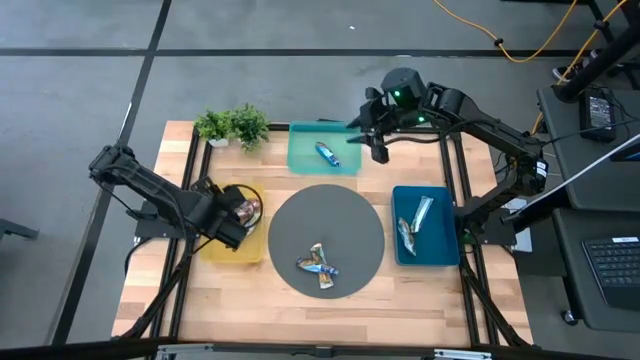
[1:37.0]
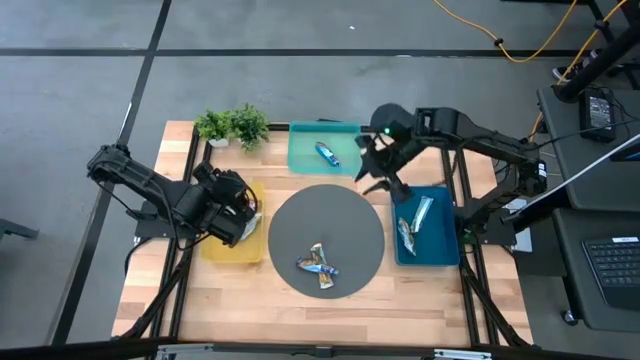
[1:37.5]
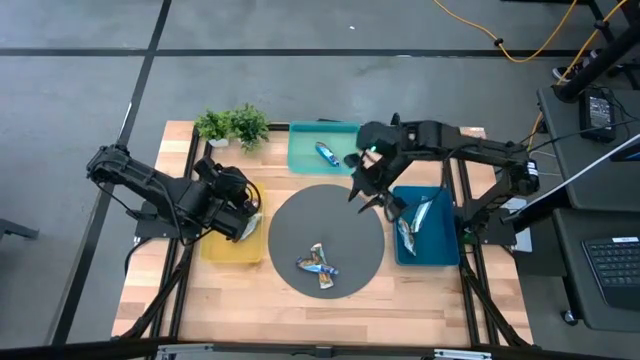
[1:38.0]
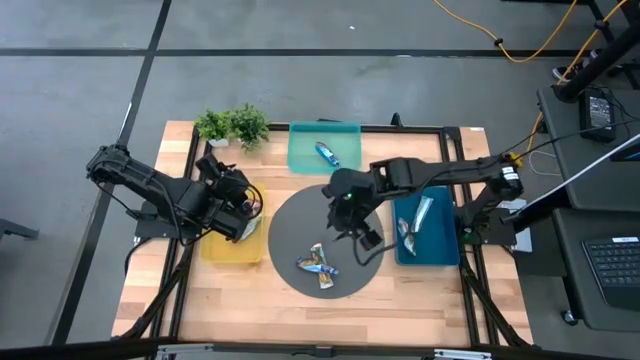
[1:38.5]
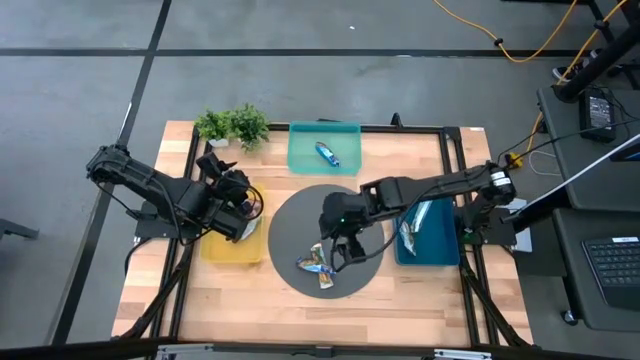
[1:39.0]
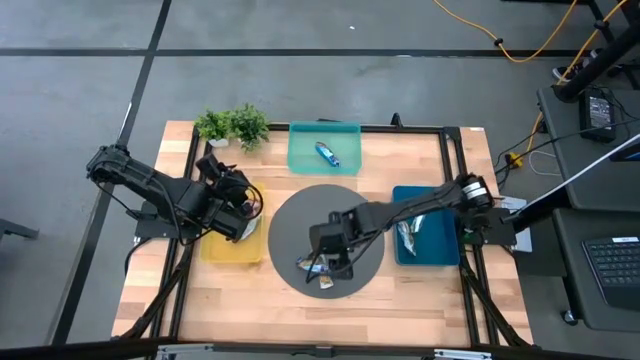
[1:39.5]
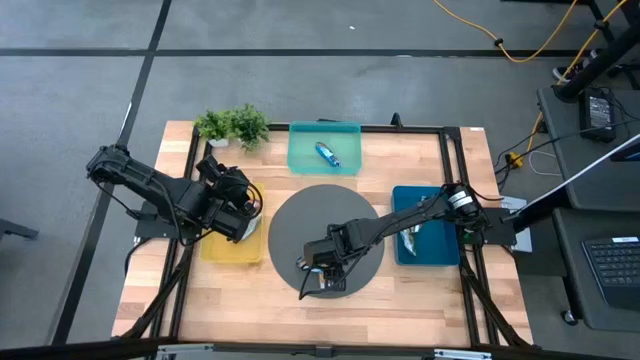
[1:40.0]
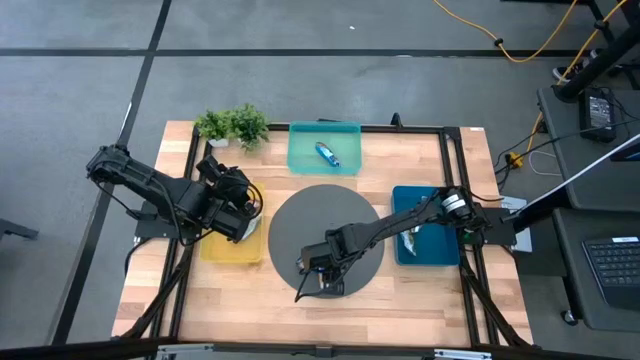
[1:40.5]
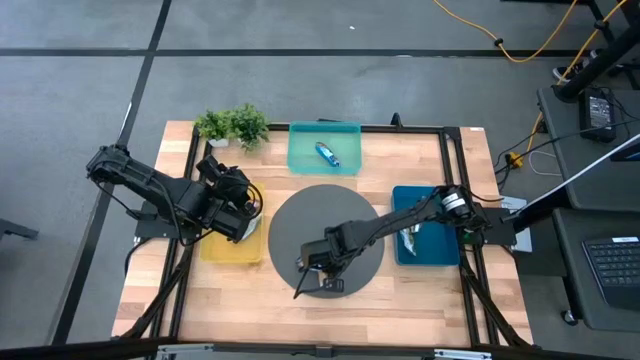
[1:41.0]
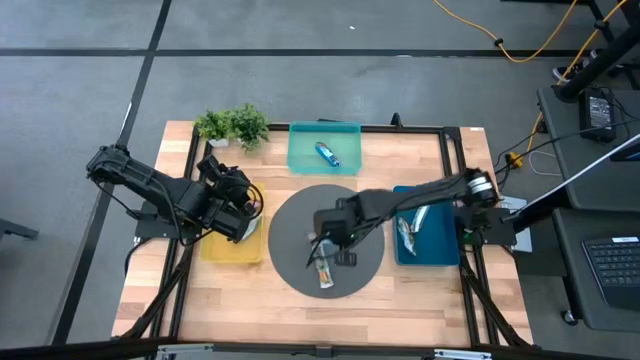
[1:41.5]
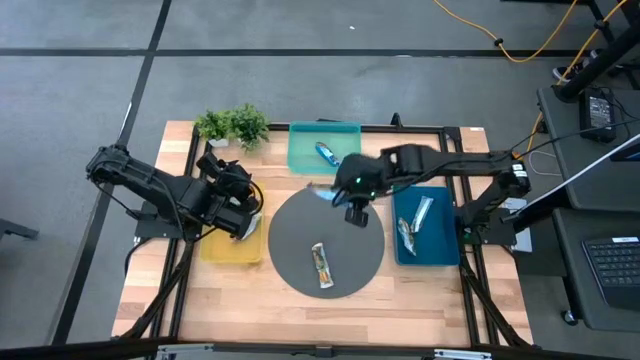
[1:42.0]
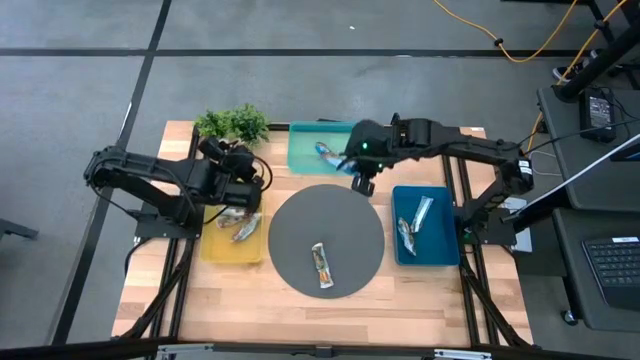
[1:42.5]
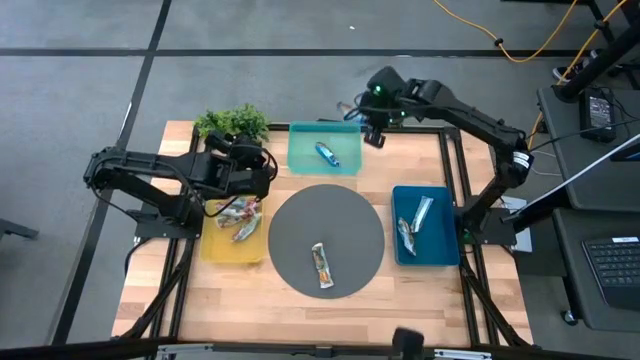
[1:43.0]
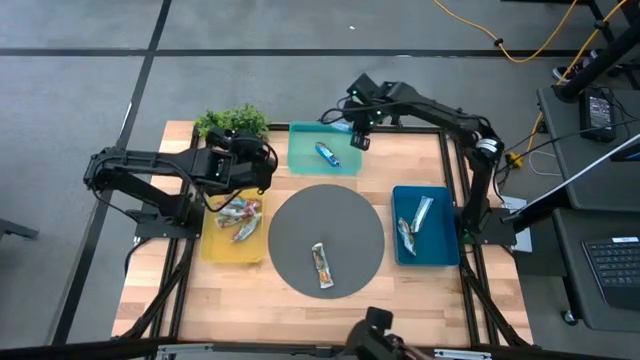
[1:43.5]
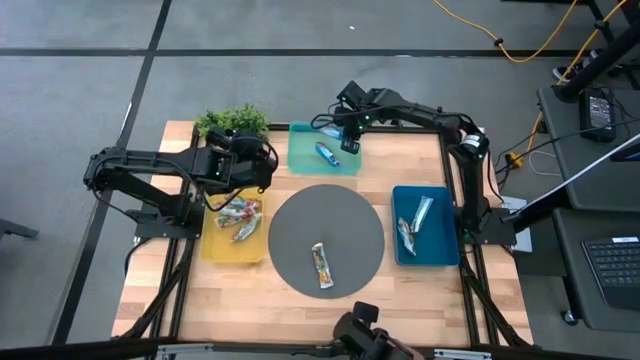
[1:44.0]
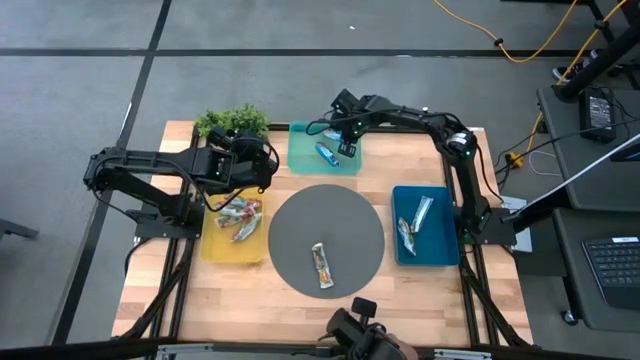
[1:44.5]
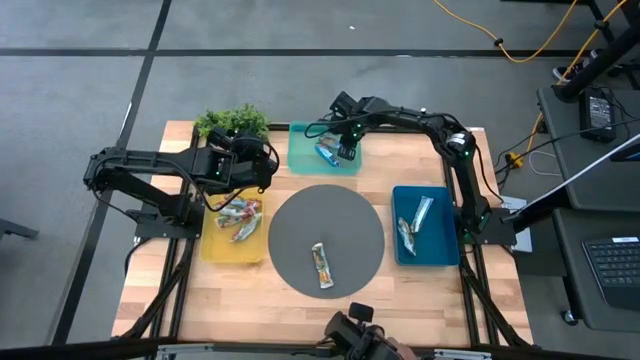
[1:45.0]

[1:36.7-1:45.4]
Task: Pick and place Granola Bars by type
Put the blue granola bar into the green bin

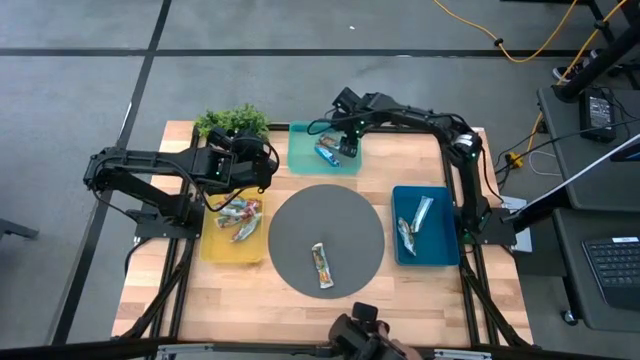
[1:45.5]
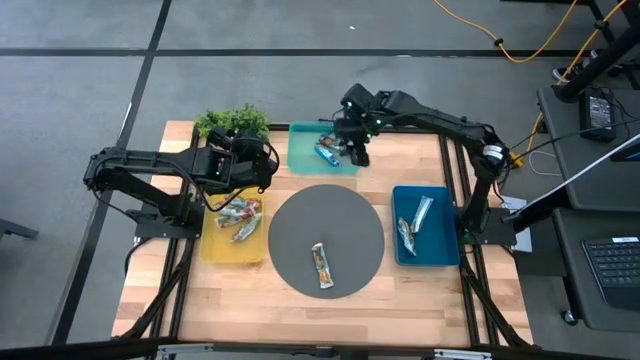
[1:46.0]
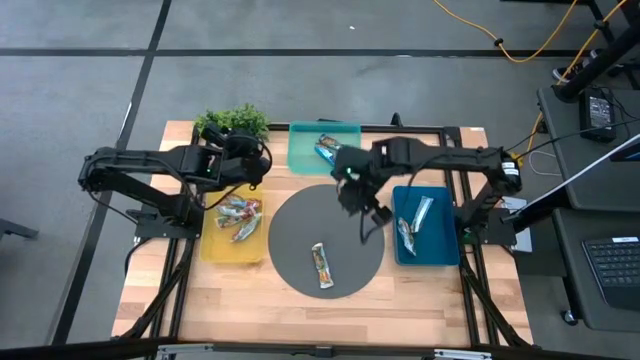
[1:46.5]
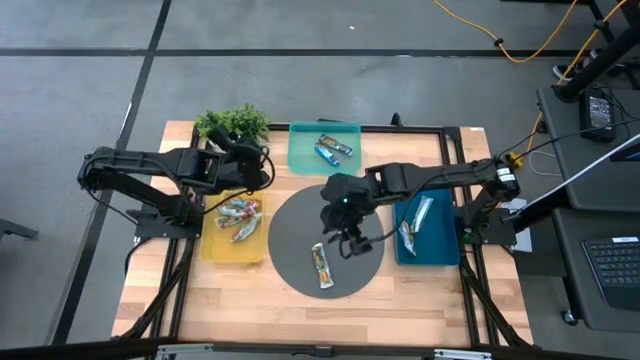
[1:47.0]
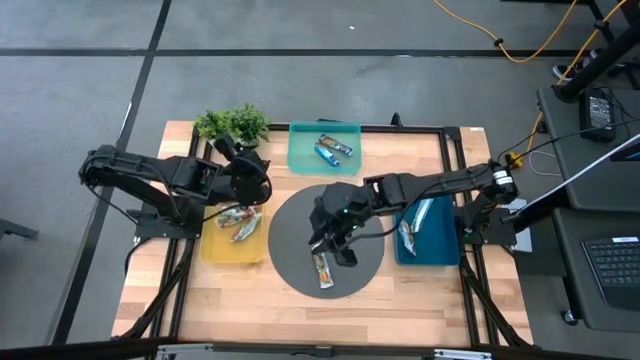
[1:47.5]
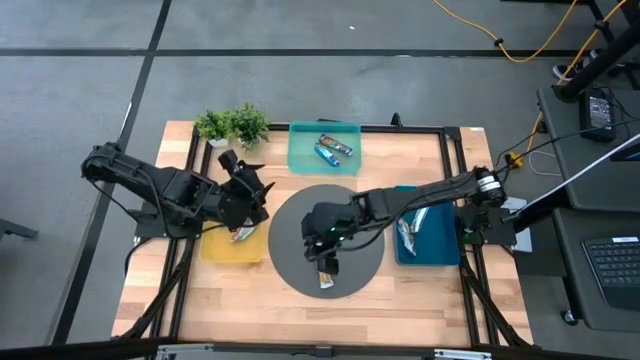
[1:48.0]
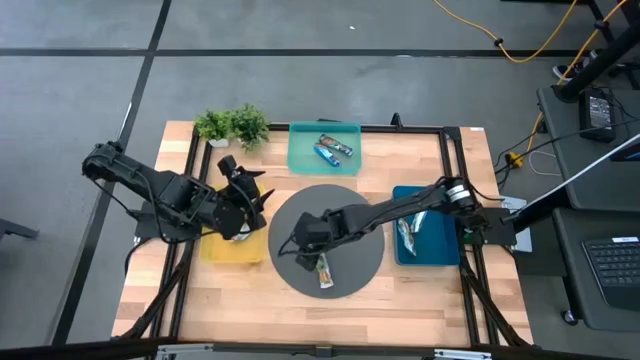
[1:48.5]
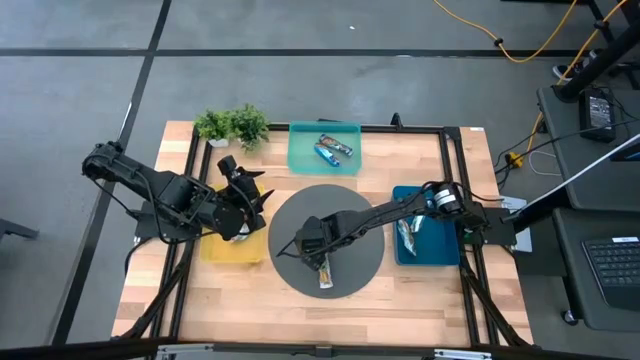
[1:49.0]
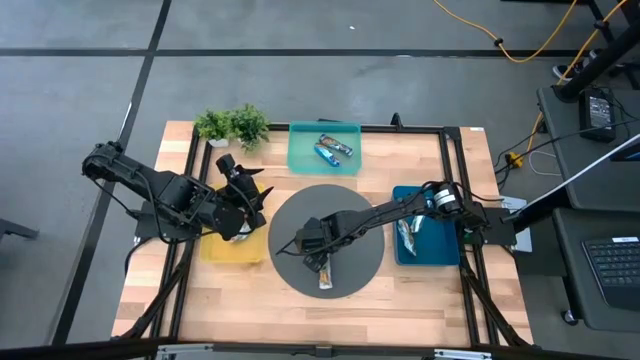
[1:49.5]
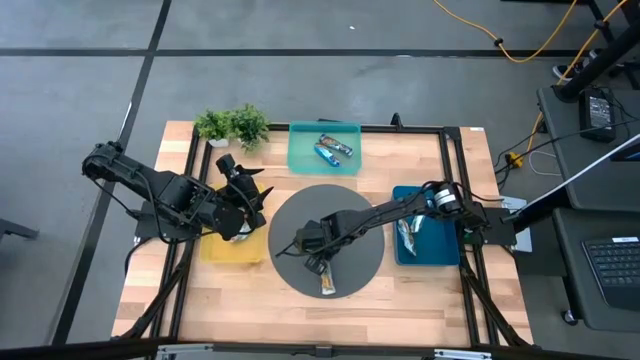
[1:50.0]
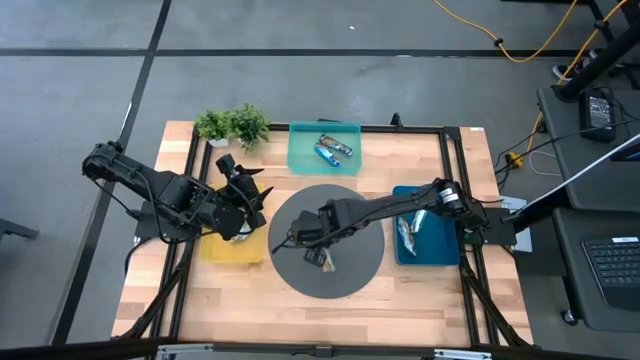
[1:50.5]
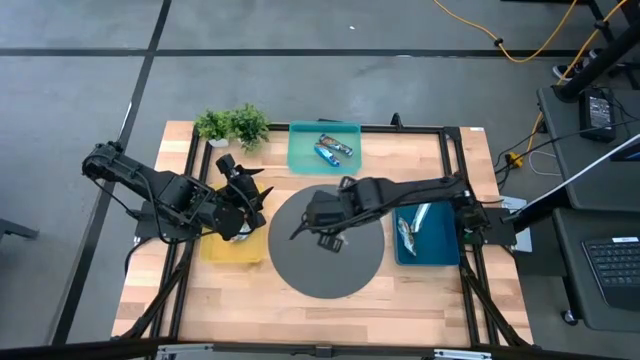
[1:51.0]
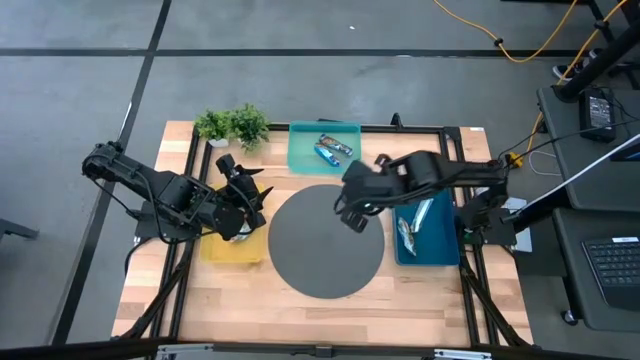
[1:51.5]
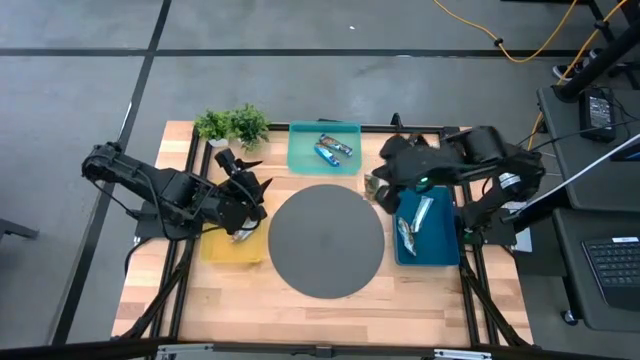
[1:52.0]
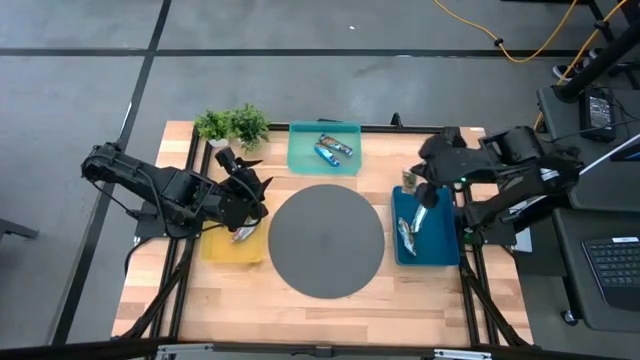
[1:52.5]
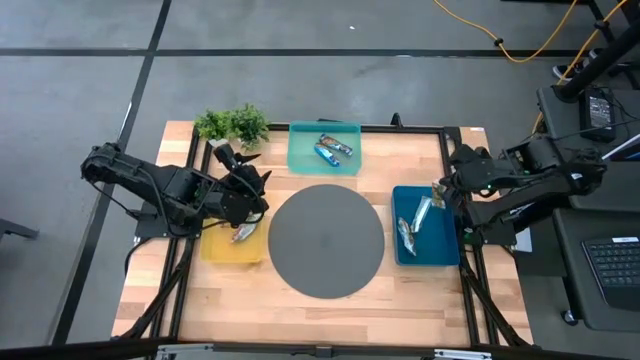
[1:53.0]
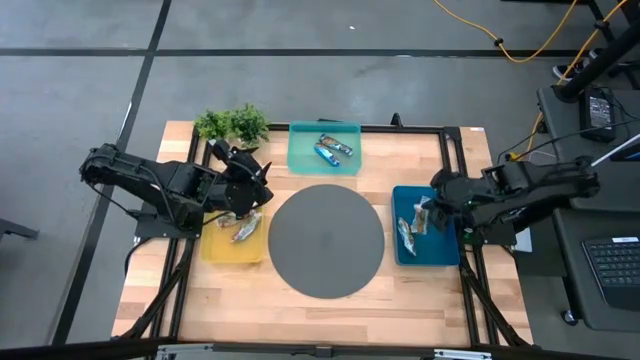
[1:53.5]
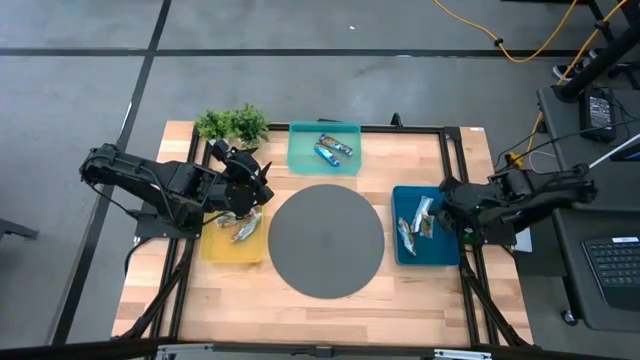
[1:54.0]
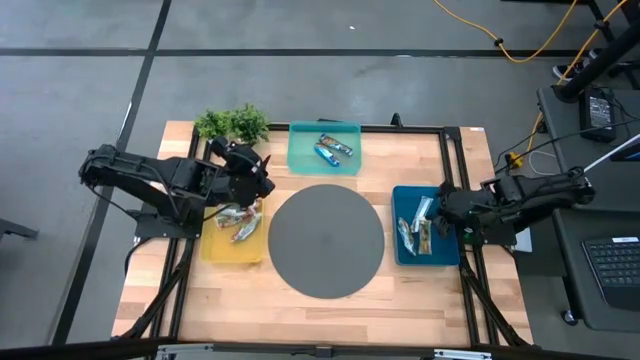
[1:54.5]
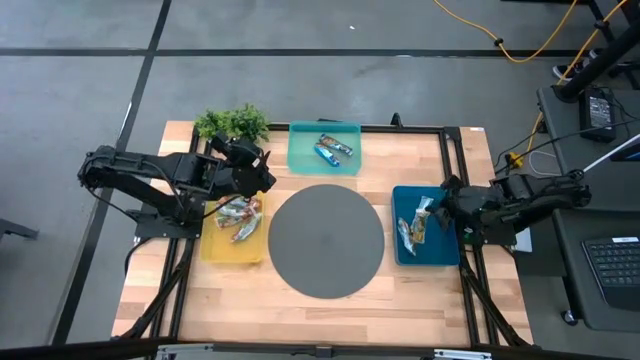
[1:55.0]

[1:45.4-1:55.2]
Put the yellow granola bar into the blue bin

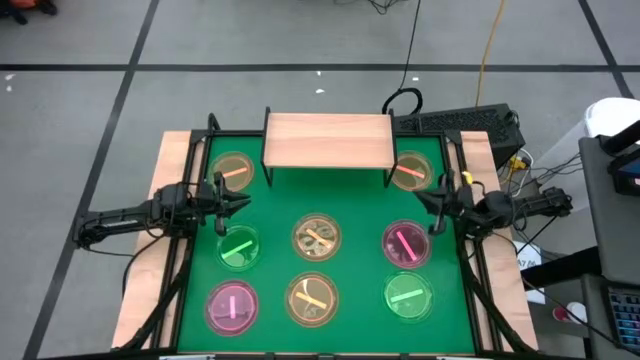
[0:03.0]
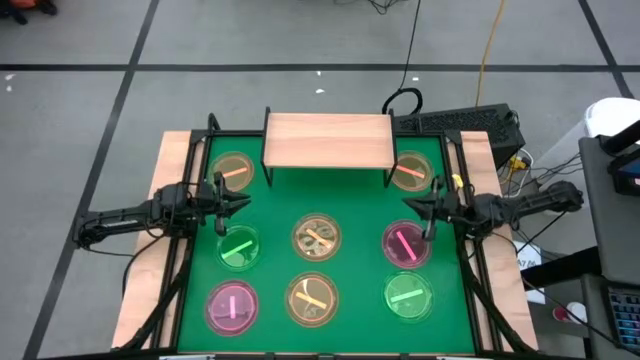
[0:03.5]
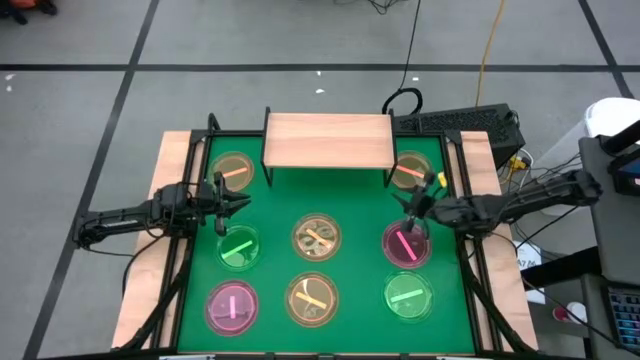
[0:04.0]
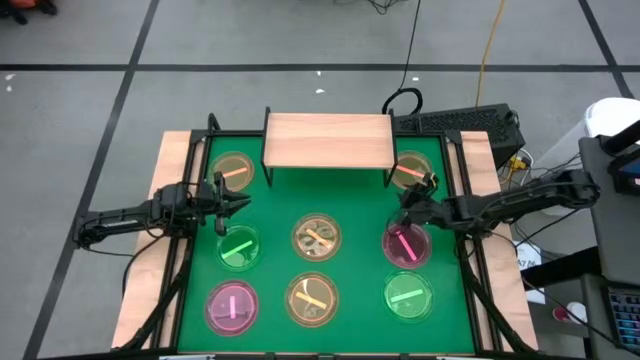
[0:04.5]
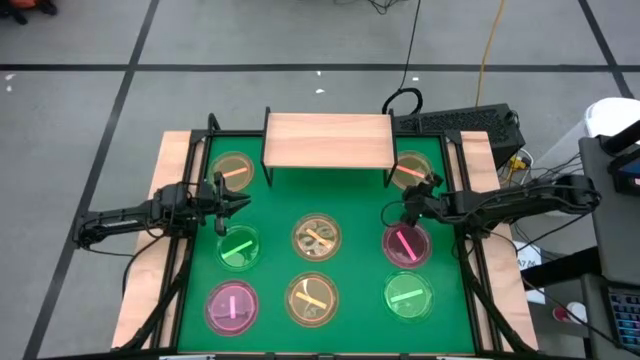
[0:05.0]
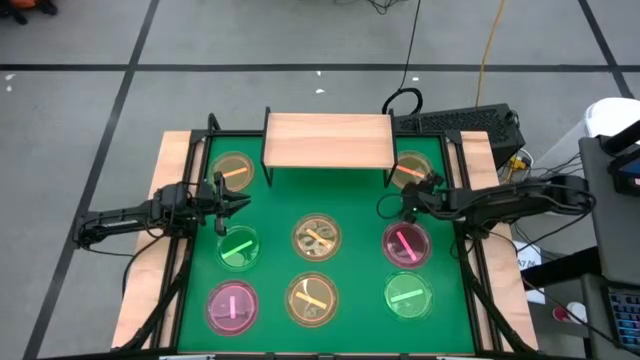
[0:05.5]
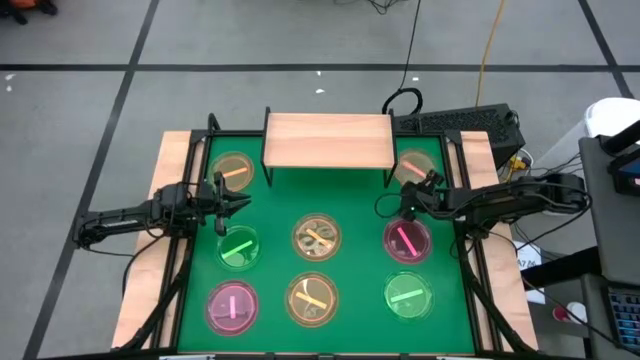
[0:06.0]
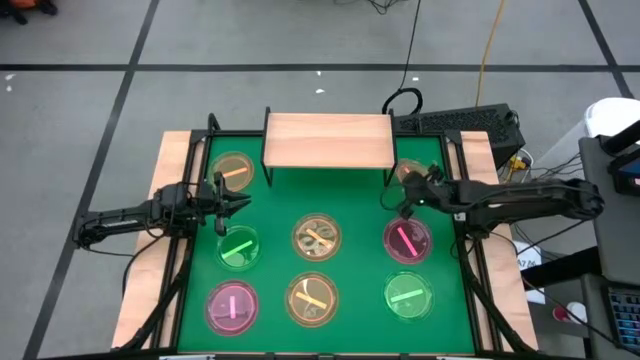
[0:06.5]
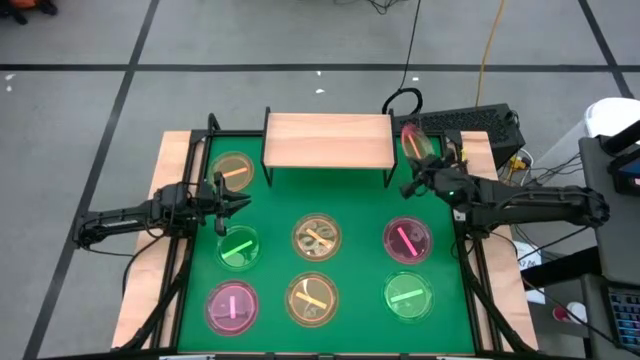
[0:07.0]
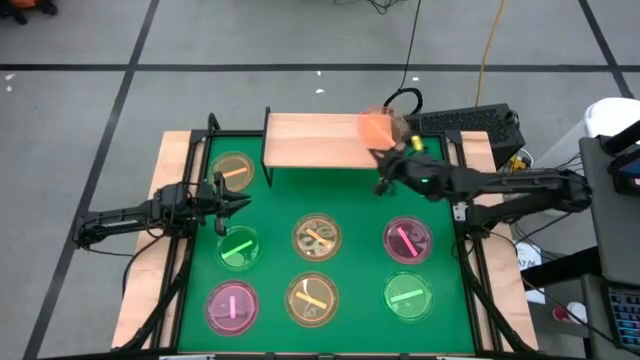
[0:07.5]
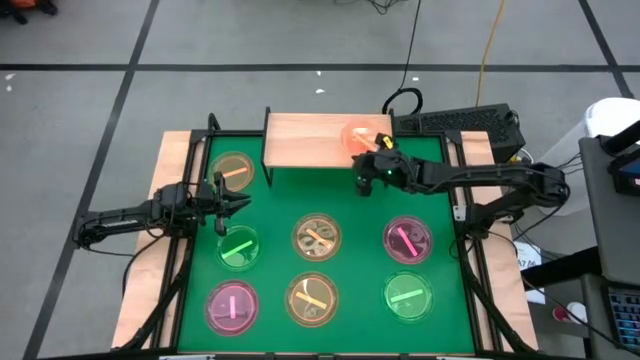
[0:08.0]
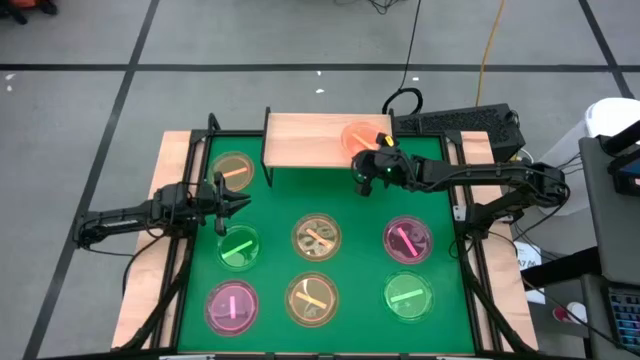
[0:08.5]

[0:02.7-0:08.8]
Task: Place and stack plates onto a shelf
Put the top right orange plate on the shelf
